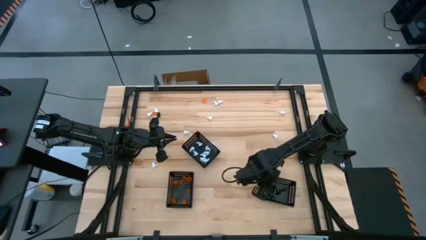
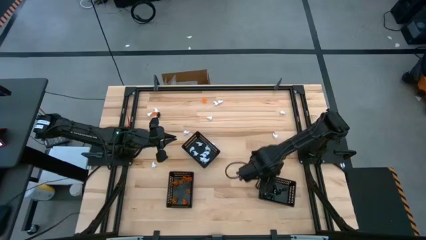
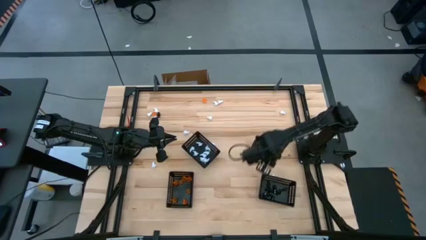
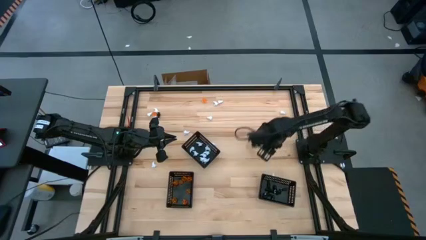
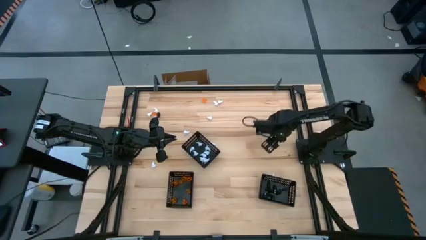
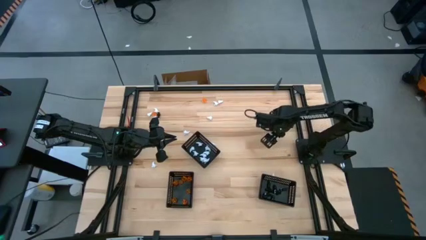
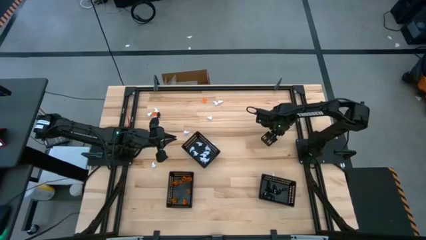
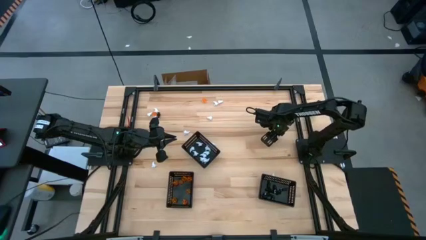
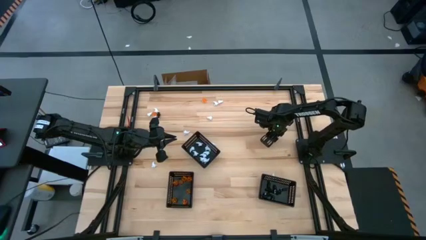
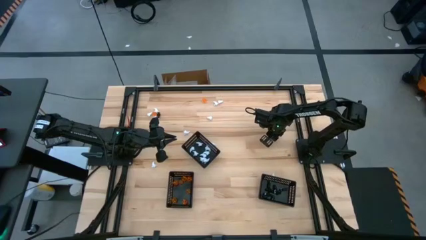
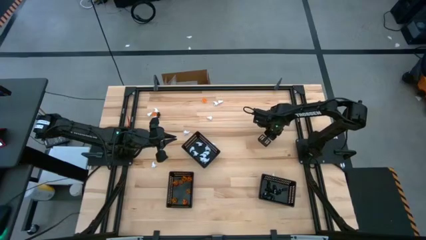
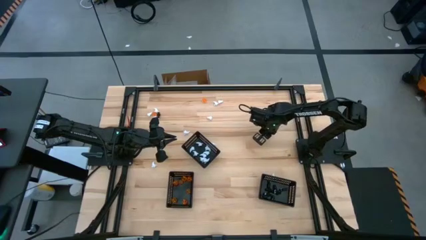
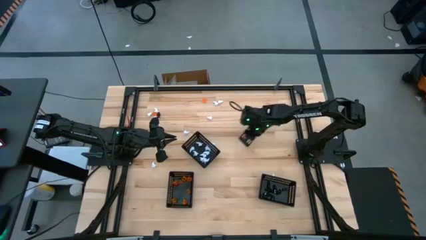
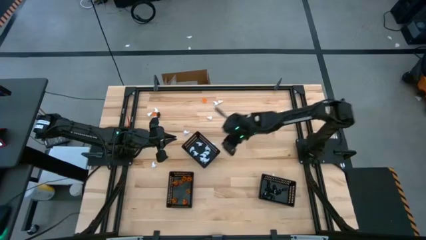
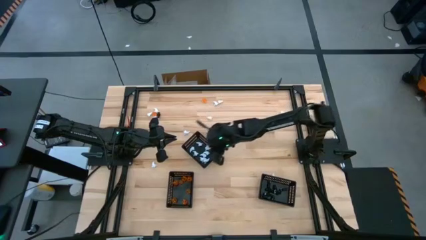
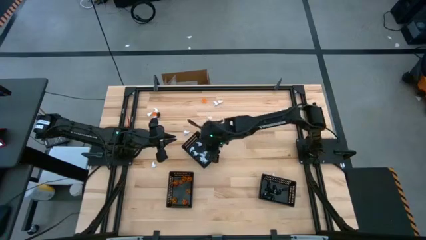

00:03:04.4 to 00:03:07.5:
Task: Sort Halloween decoration
Put the white ghost toy into the middle black basket

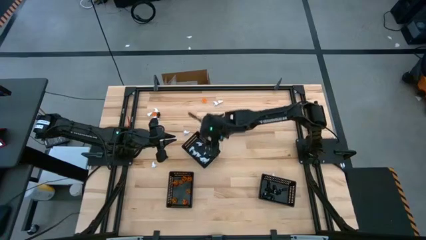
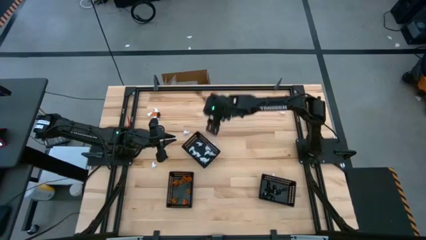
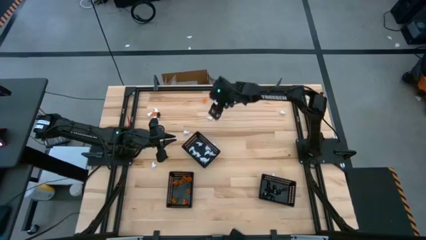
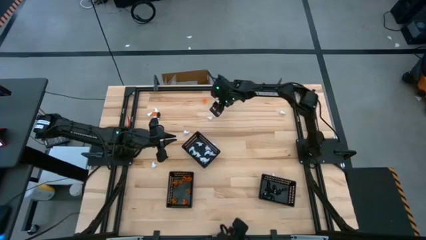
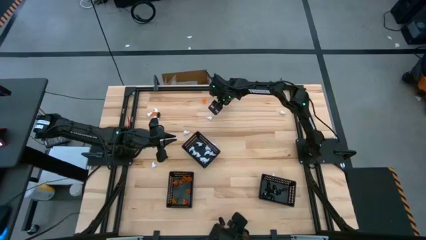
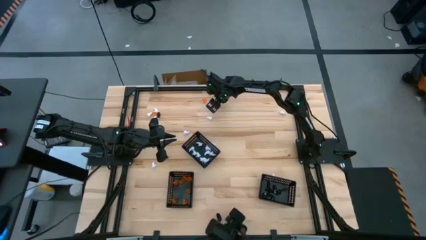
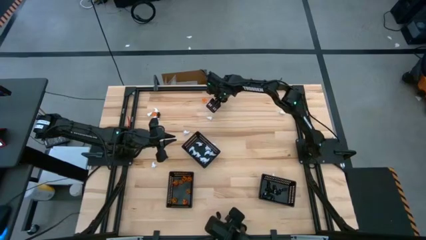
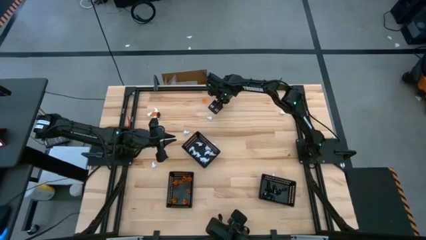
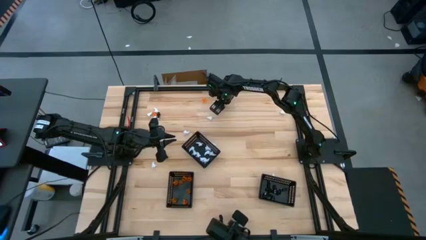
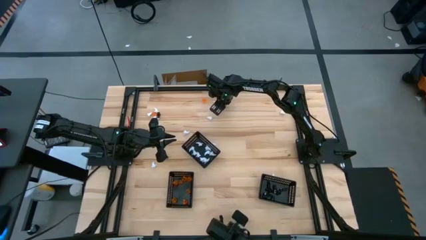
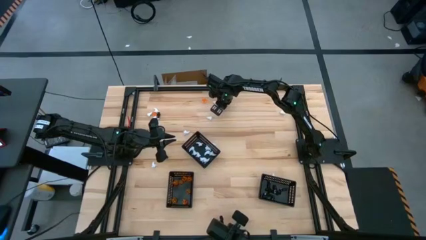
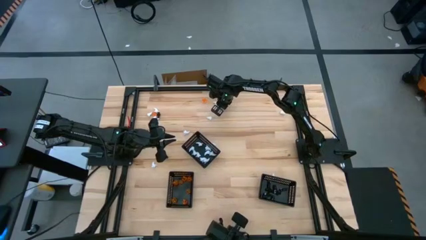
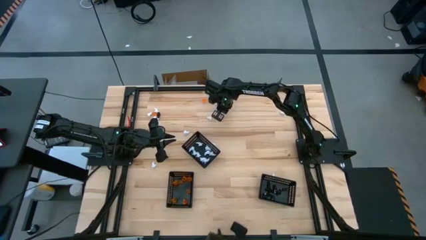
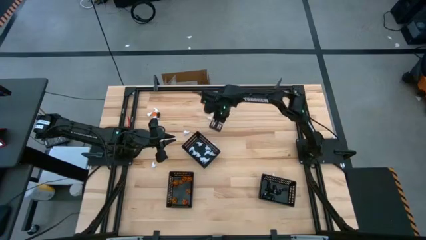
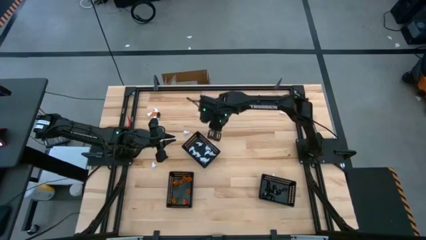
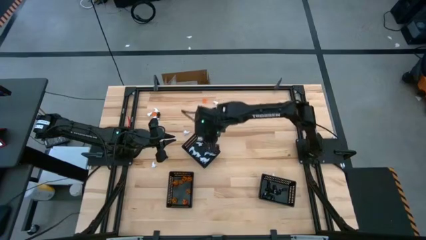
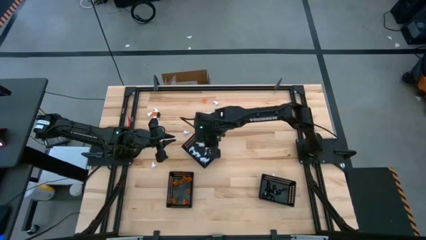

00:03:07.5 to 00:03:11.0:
Put the white ghost toy into the middle black basket

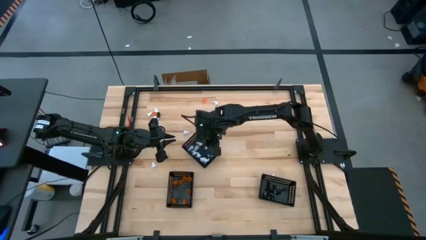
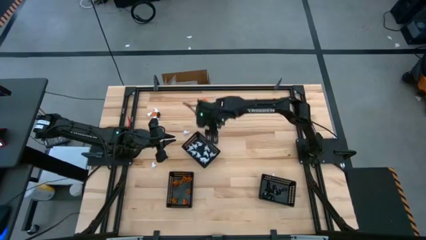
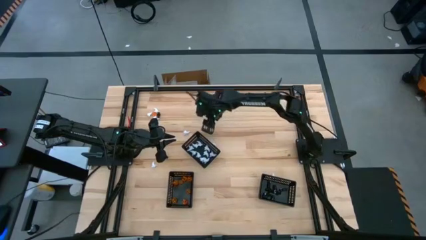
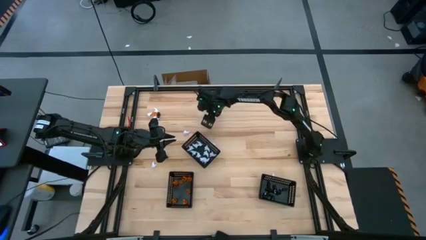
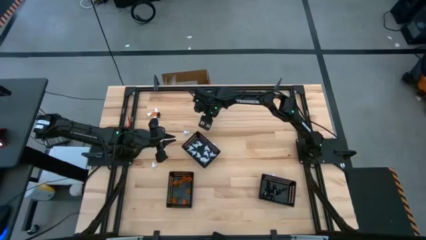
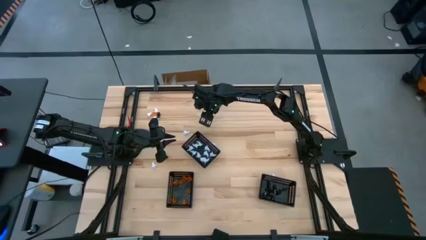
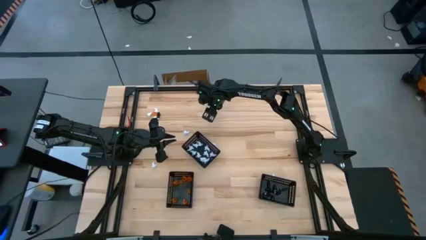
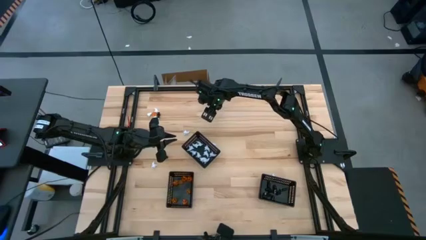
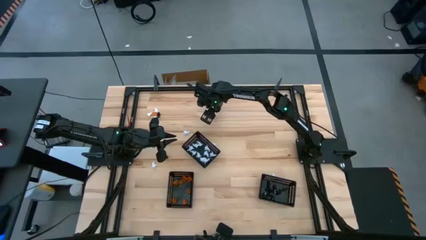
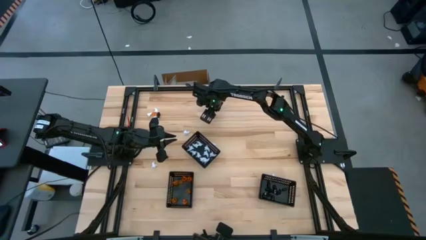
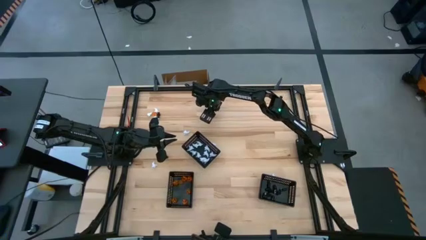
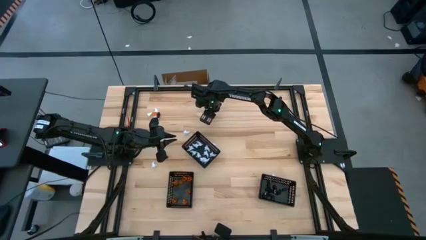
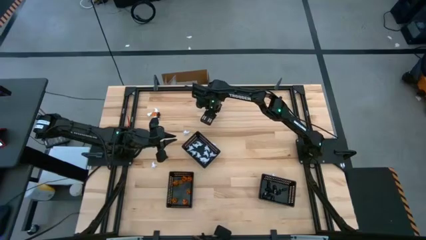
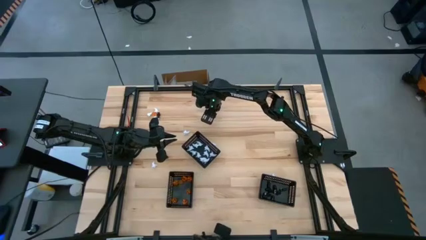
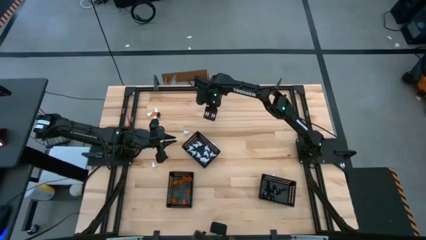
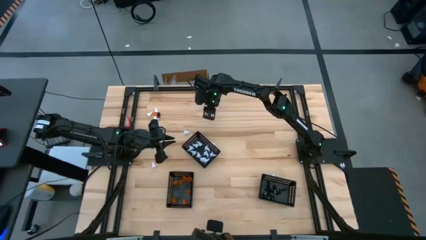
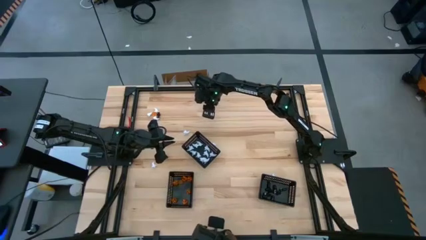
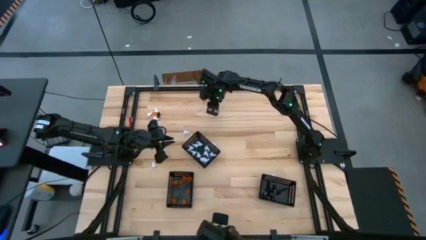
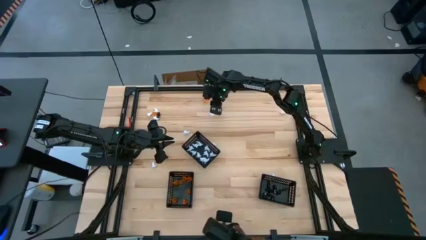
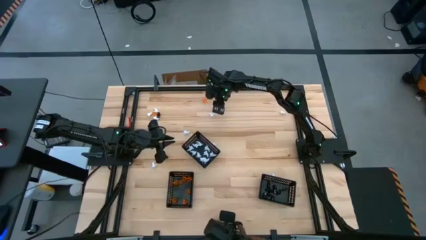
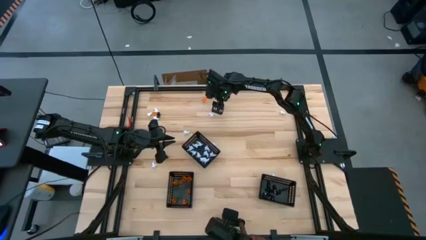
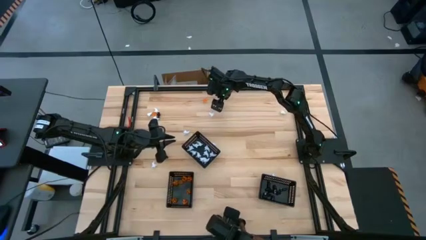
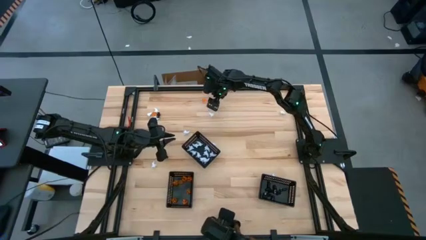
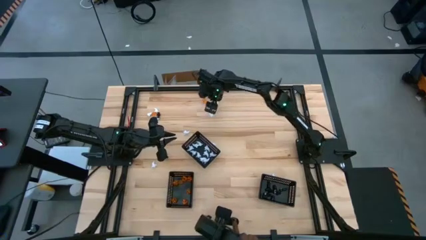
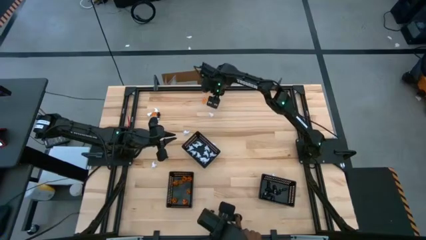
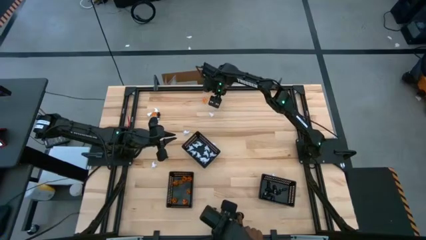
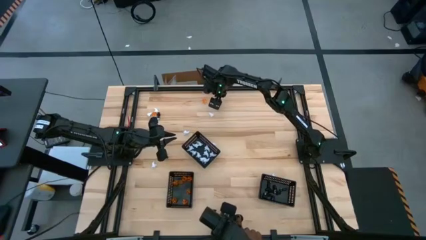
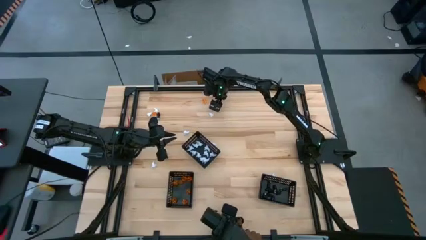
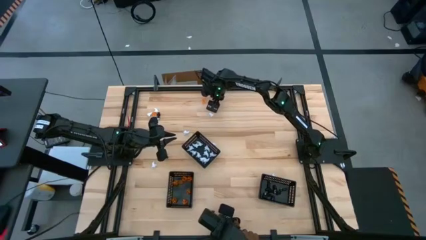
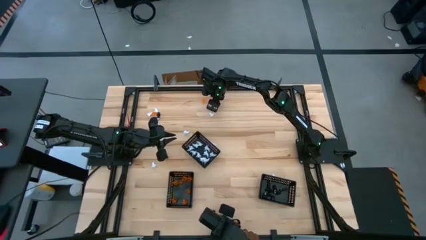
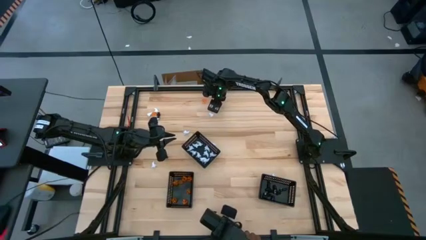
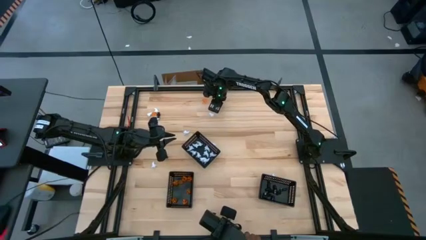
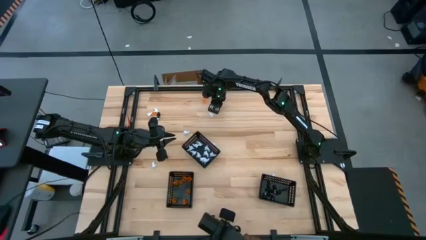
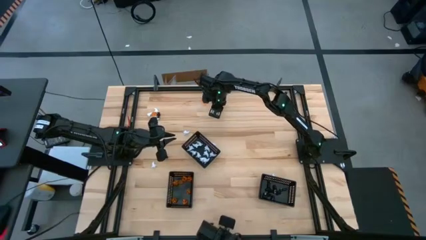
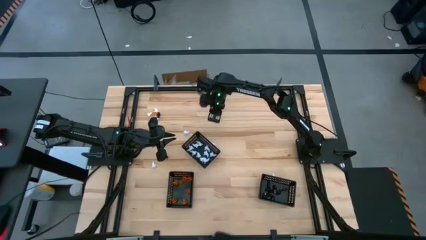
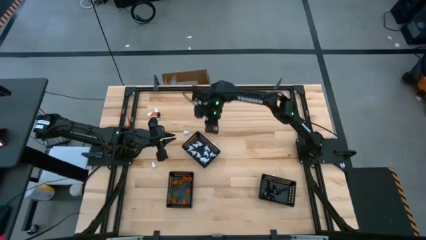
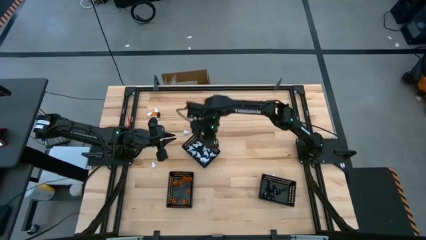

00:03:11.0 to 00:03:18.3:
Put the white ghost toy into the middle black basket
